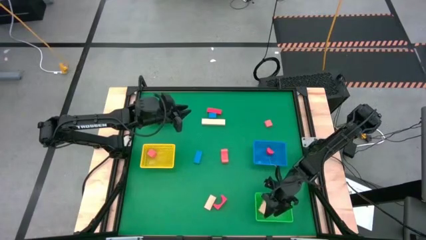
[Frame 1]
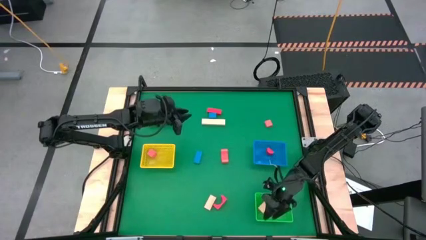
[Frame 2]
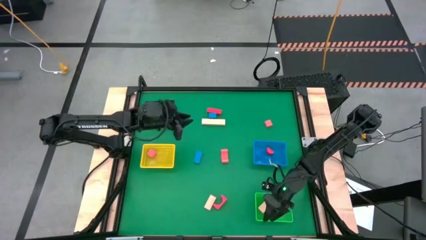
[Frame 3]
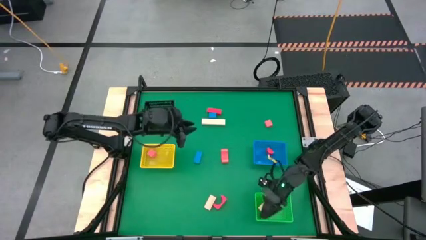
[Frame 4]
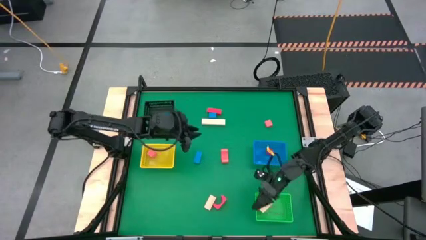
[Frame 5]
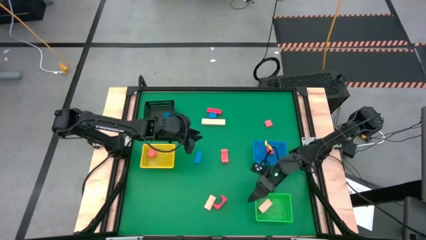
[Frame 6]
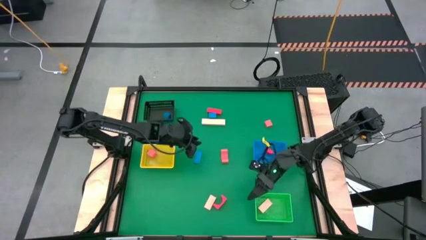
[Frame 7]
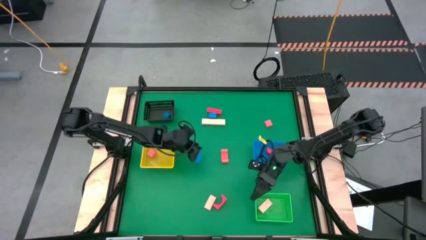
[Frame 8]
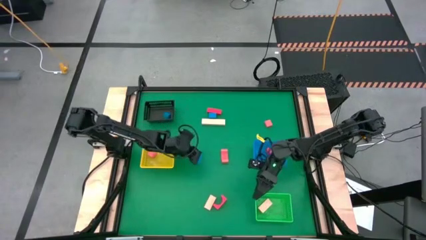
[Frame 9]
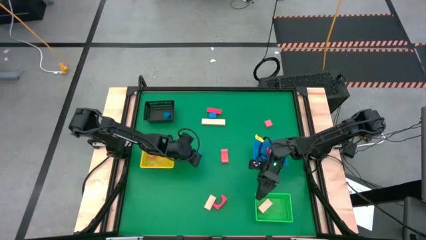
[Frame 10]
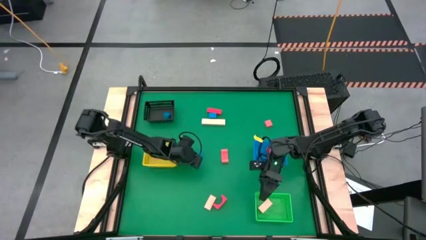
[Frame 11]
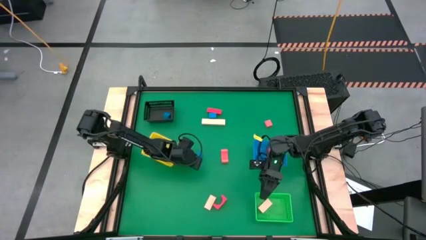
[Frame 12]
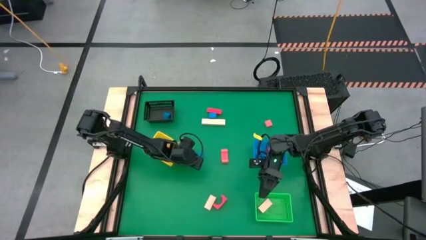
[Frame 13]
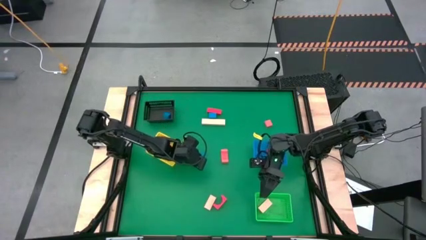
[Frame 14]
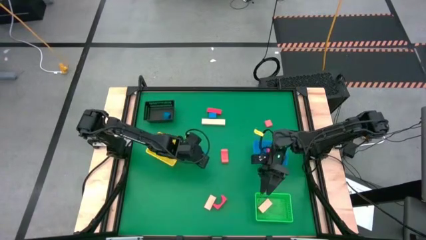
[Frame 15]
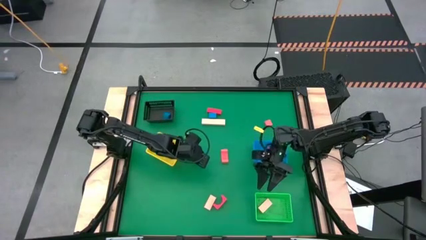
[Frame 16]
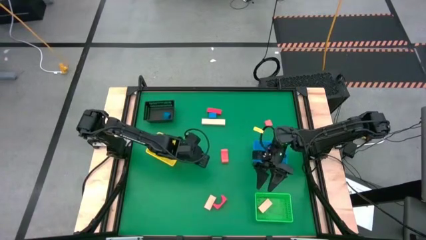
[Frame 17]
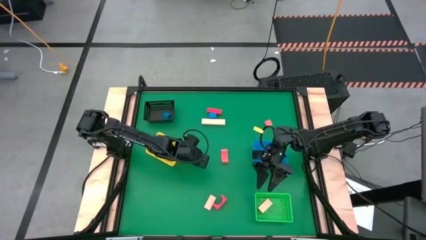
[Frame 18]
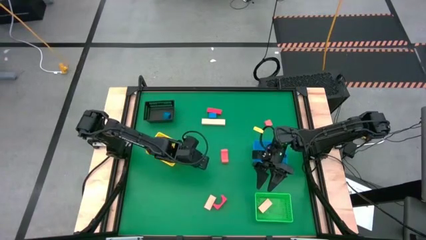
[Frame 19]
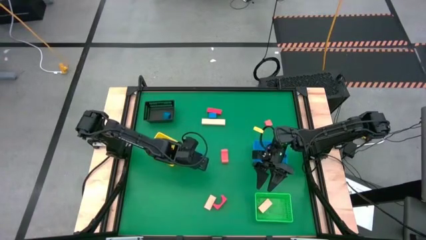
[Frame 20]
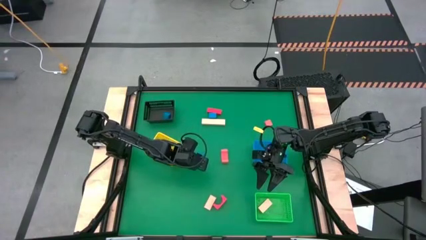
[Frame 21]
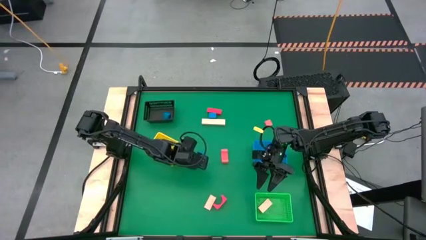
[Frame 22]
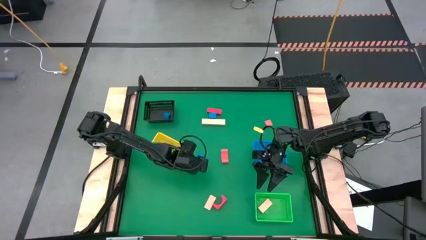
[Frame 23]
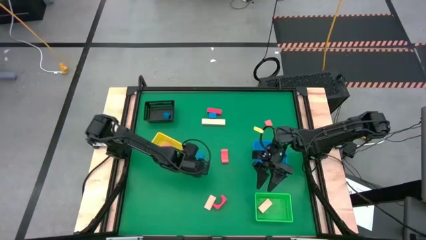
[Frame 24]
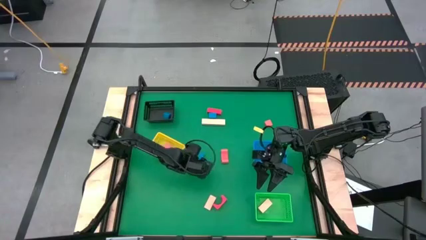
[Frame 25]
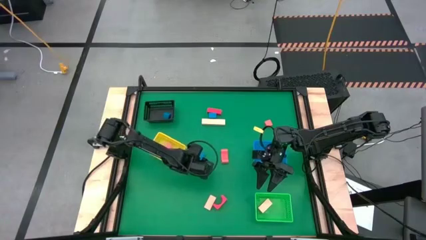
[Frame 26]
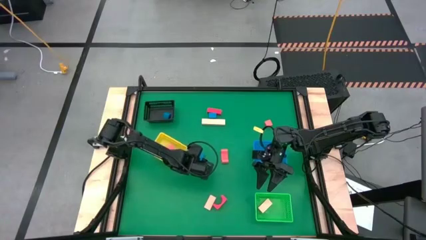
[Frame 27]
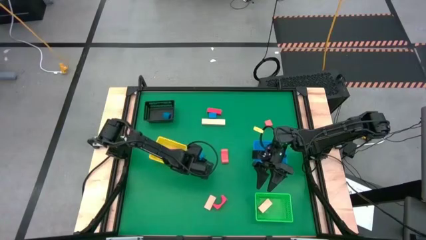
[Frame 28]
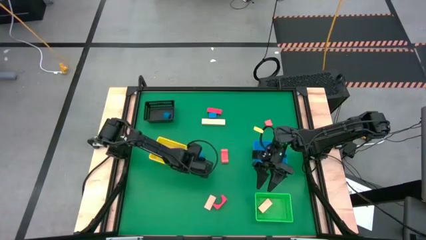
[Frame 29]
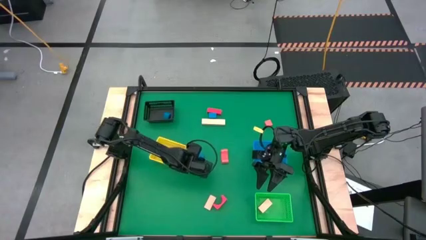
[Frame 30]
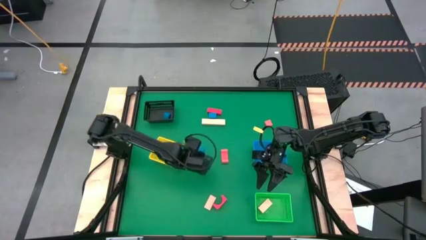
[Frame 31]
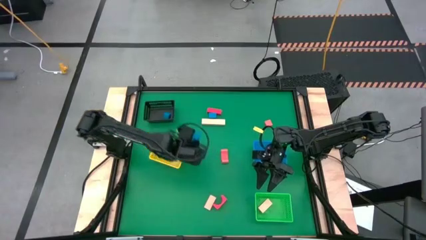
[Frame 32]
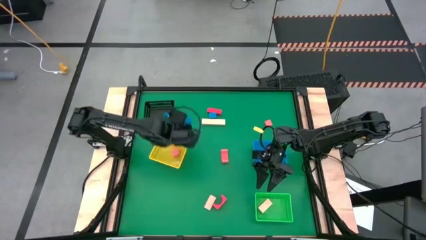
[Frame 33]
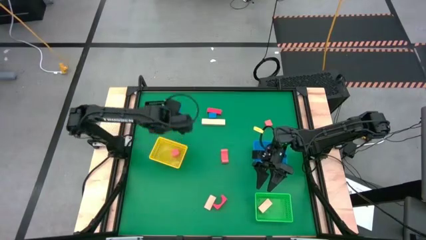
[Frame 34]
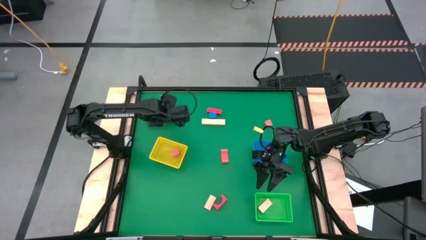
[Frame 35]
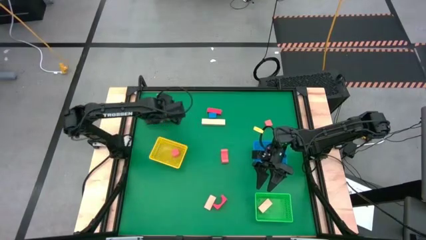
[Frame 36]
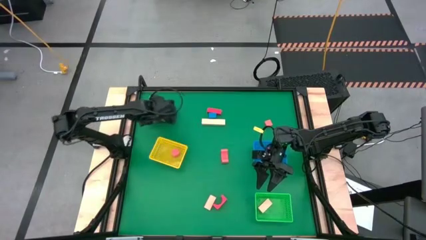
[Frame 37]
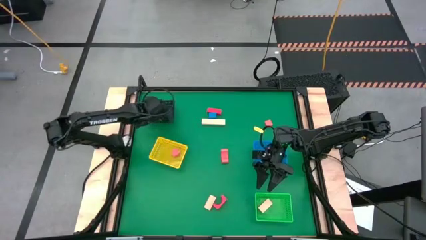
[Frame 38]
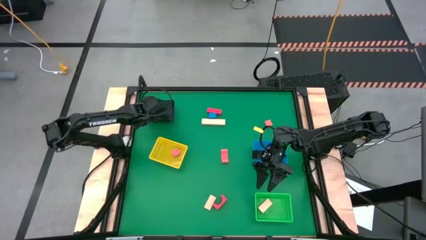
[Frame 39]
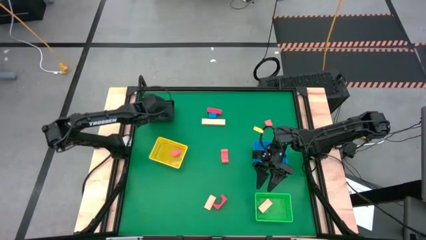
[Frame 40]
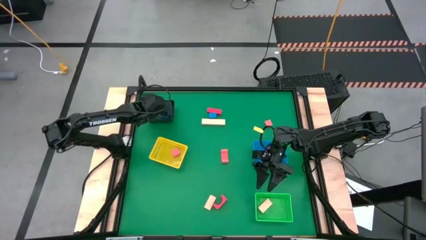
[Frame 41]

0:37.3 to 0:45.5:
Task: Sort & place blocks by color
Put the blue rectangular block into the black basket

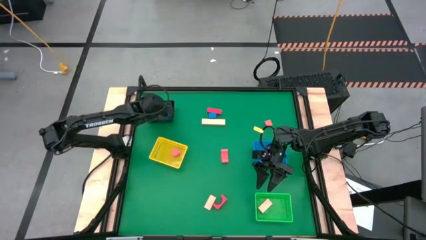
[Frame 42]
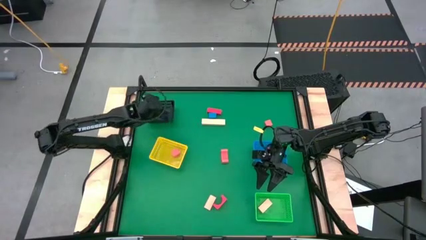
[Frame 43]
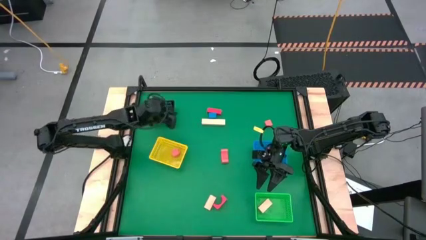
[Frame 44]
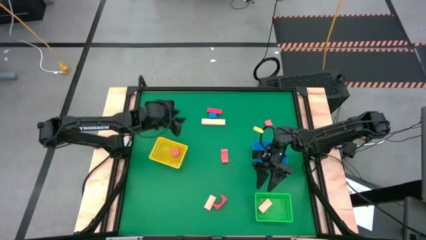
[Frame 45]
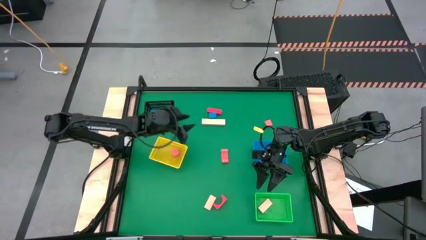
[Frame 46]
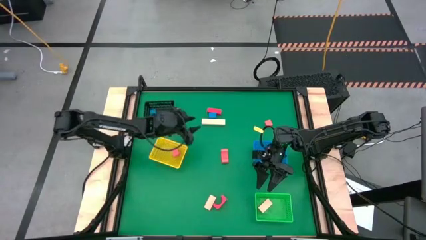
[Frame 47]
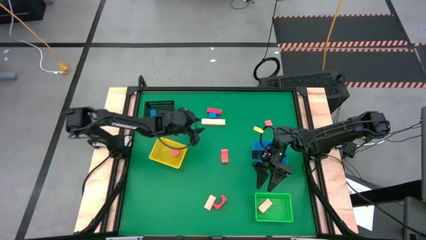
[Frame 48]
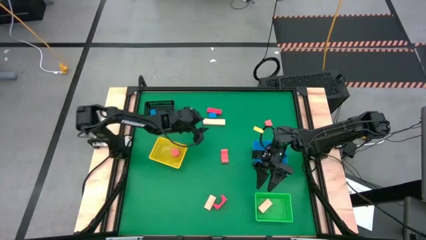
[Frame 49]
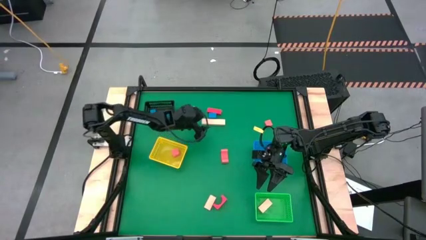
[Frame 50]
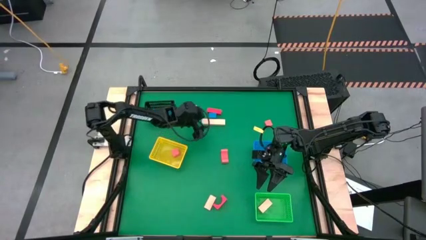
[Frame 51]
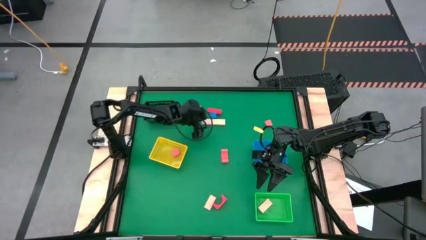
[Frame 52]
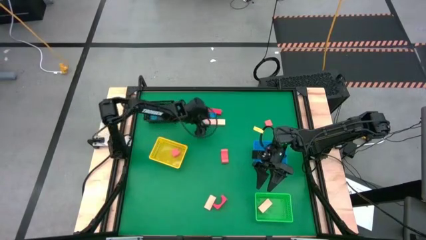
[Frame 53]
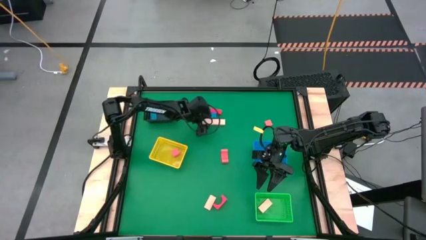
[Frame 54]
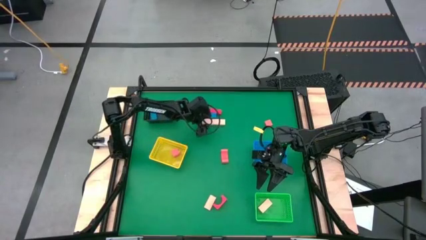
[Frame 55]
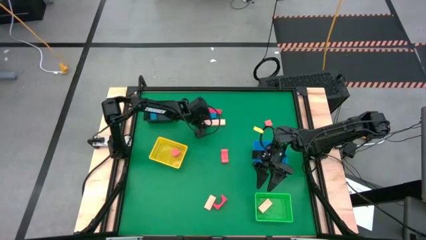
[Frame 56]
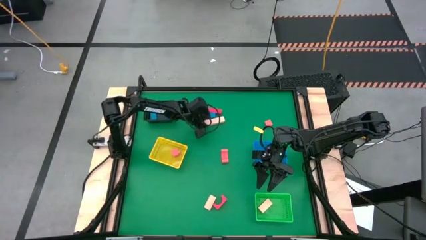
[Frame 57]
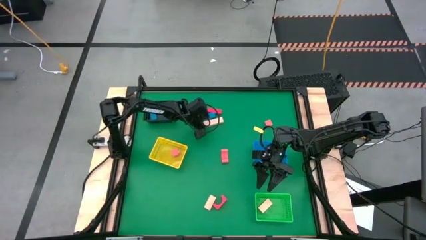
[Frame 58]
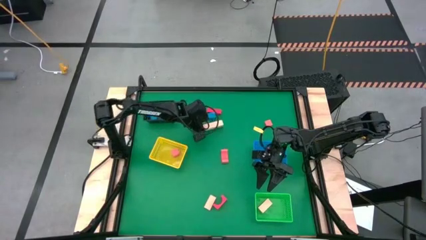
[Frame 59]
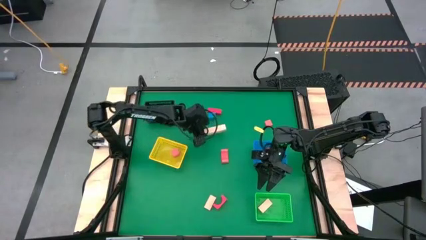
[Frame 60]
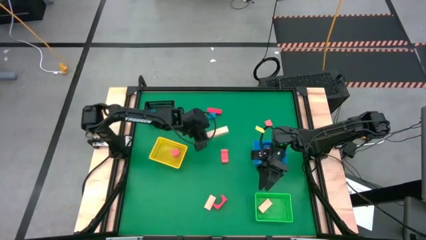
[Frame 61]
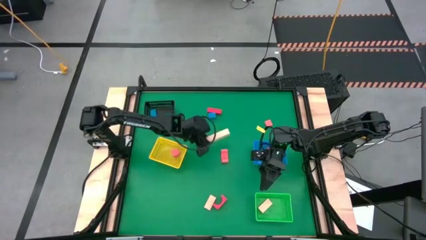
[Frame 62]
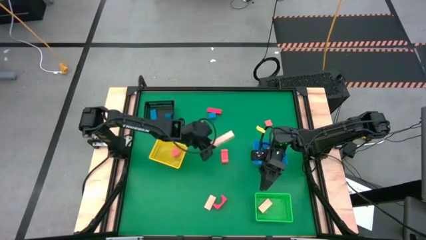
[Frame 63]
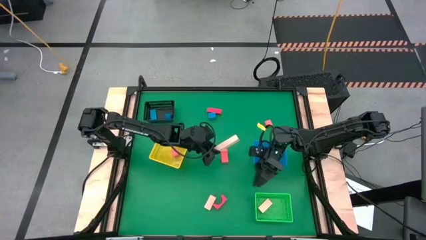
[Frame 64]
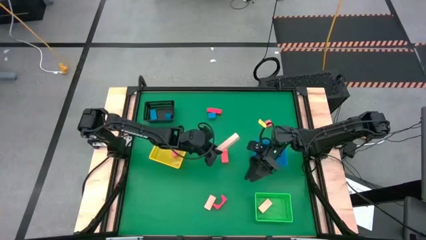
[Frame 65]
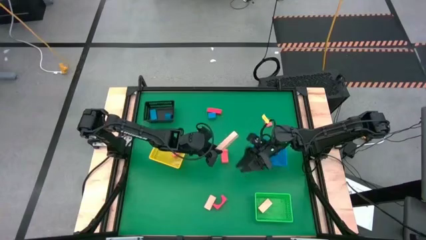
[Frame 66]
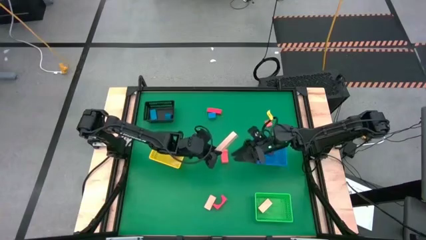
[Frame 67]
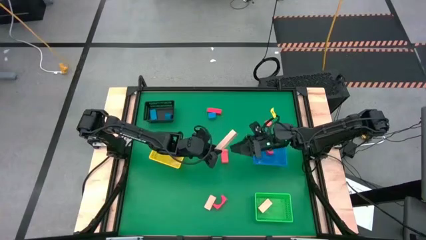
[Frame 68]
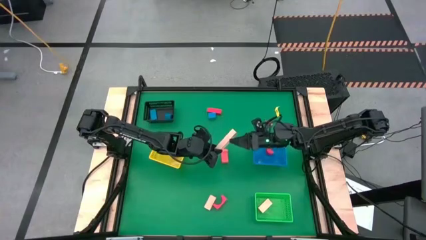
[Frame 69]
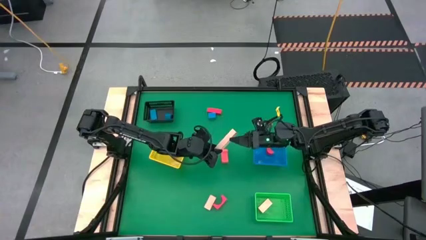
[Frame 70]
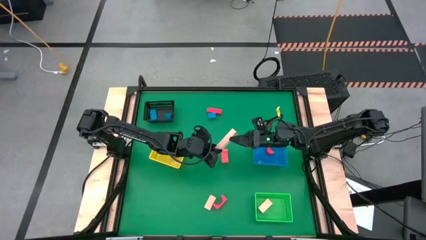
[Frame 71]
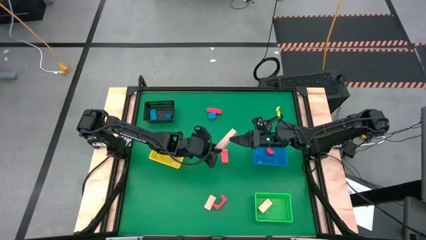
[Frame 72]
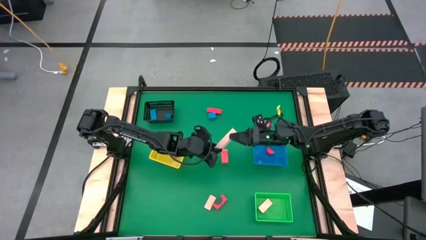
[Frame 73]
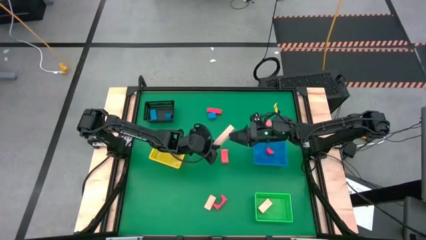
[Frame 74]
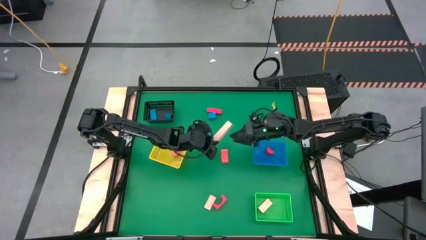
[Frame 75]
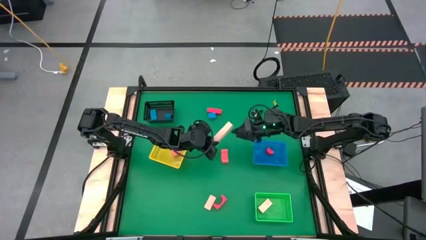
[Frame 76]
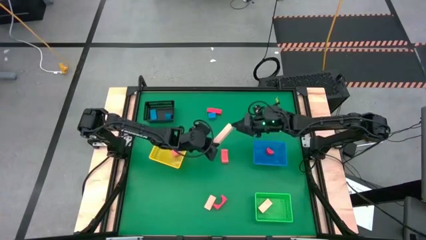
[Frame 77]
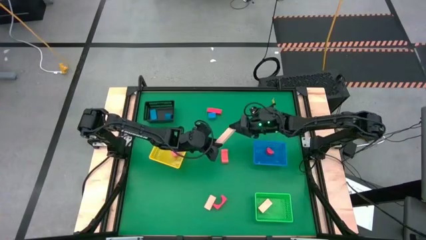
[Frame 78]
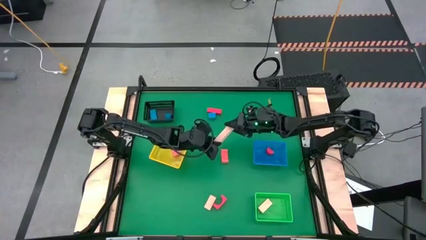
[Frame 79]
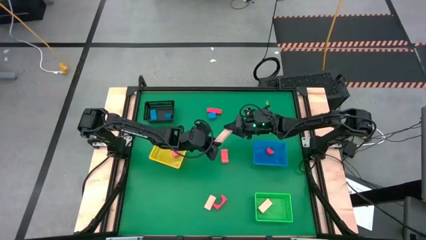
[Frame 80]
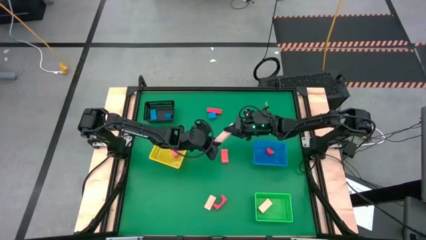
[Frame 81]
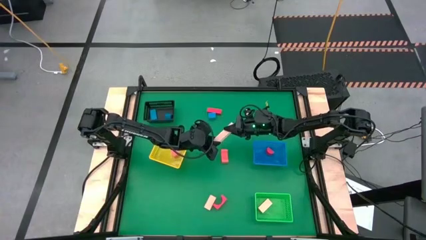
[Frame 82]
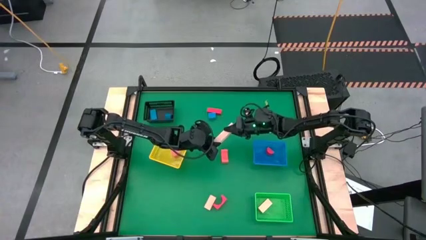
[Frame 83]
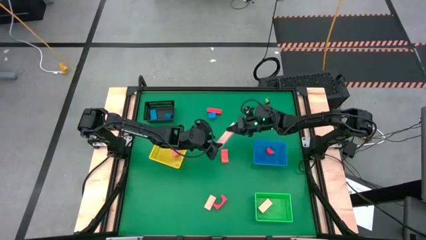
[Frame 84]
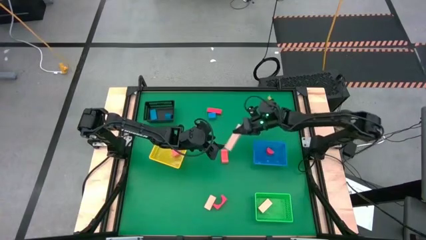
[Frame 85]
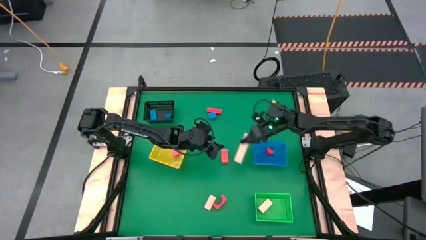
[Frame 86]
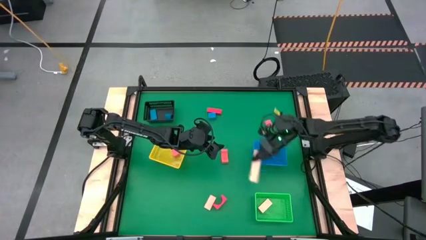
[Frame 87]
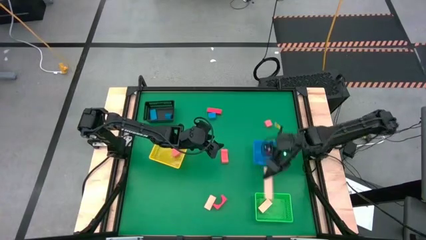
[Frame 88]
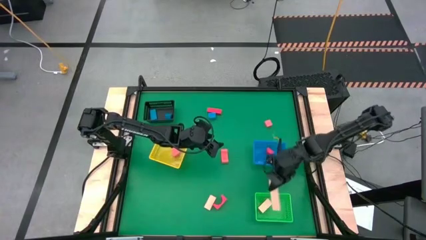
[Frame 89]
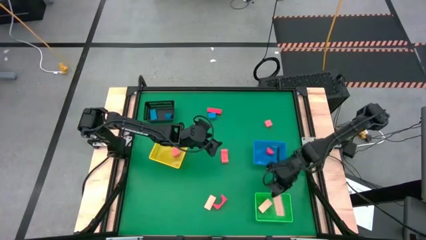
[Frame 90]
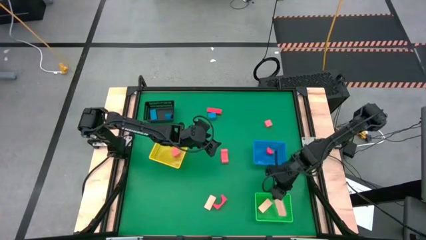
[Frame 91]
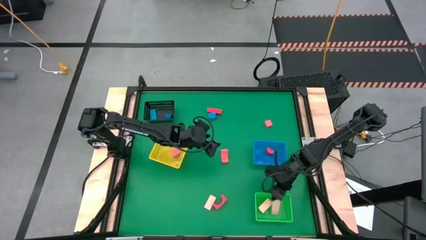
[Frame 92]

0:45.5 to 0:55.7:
Put the top beige rectangular block into the green basket
